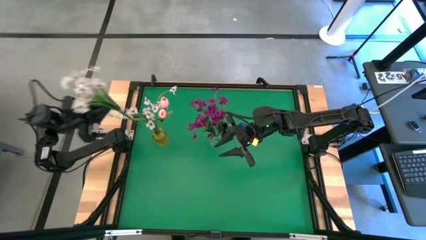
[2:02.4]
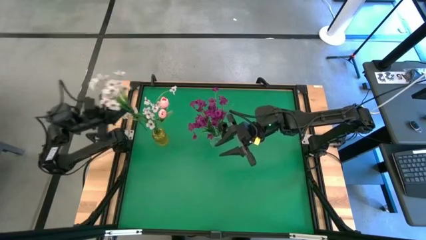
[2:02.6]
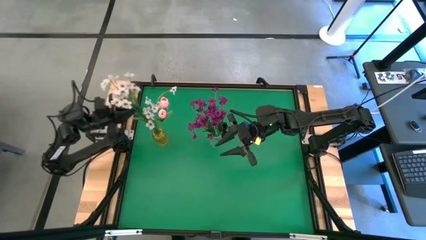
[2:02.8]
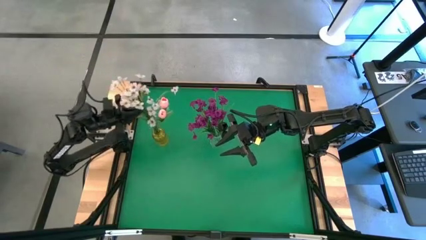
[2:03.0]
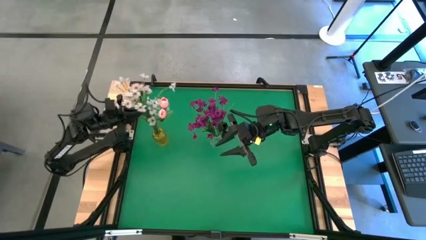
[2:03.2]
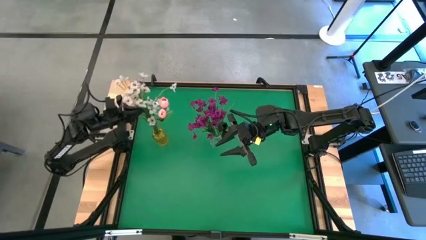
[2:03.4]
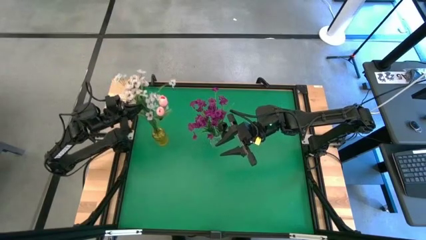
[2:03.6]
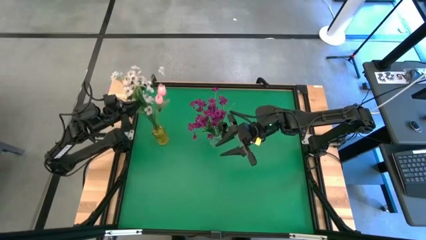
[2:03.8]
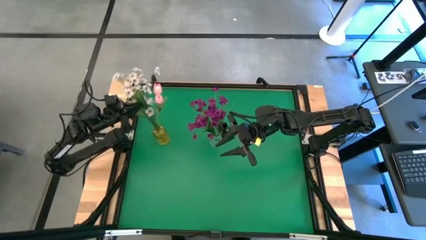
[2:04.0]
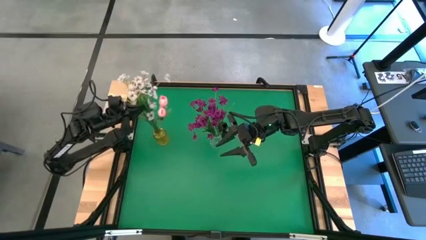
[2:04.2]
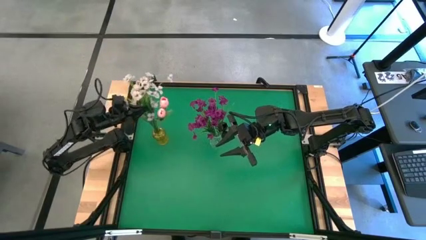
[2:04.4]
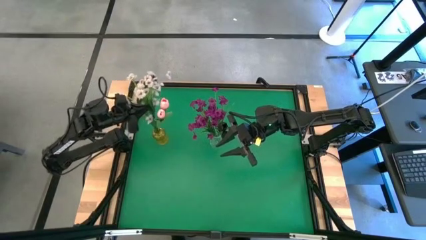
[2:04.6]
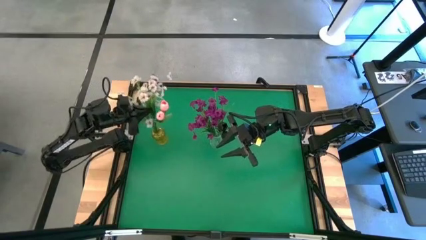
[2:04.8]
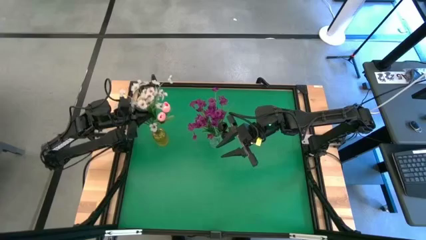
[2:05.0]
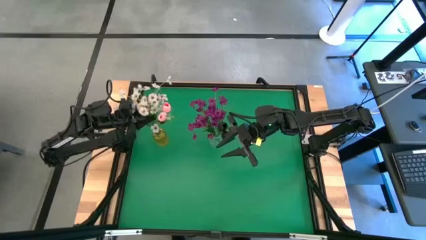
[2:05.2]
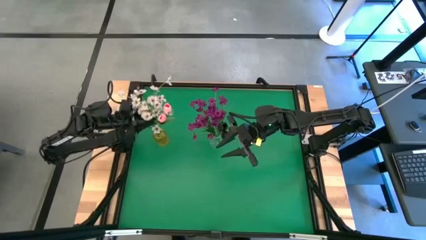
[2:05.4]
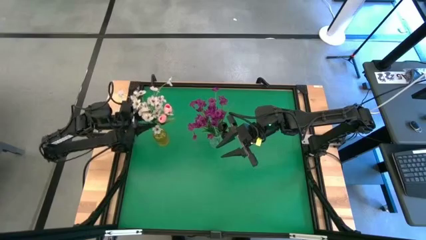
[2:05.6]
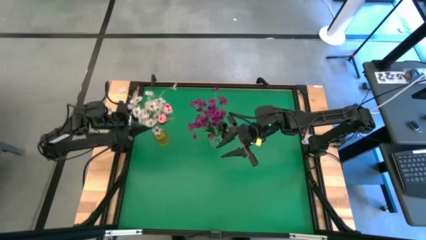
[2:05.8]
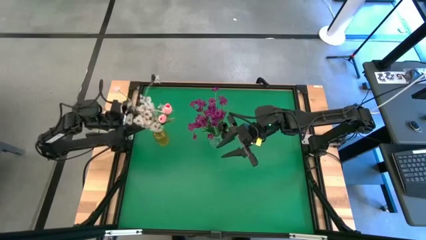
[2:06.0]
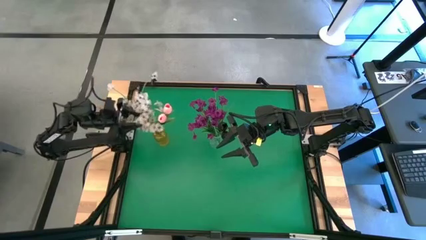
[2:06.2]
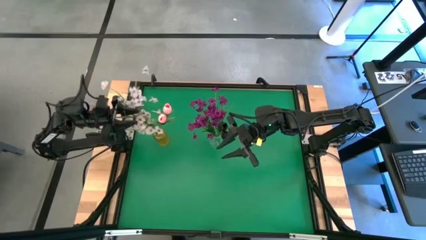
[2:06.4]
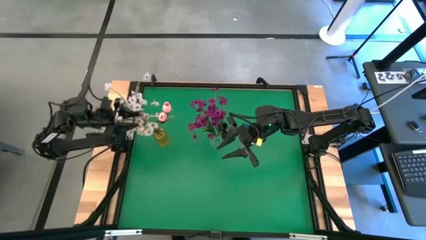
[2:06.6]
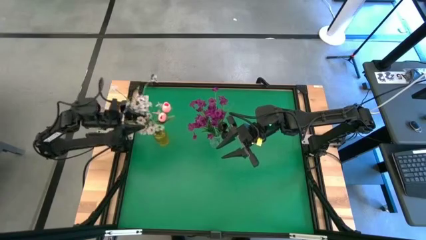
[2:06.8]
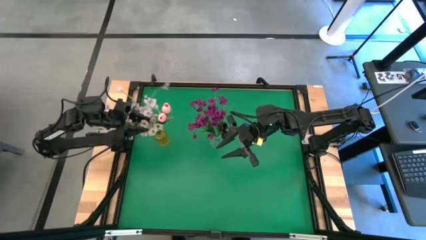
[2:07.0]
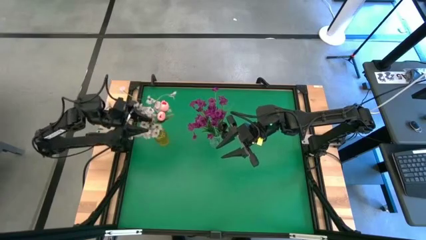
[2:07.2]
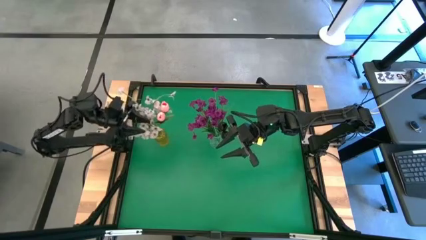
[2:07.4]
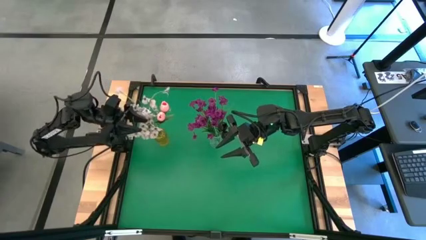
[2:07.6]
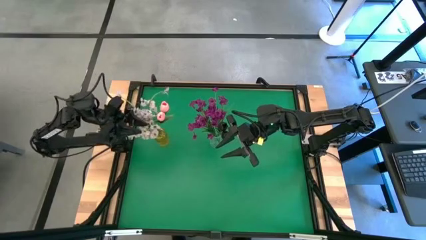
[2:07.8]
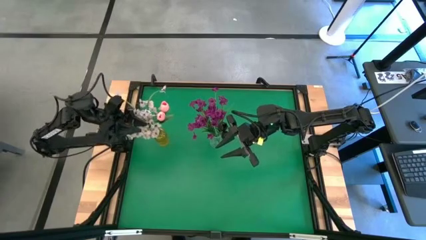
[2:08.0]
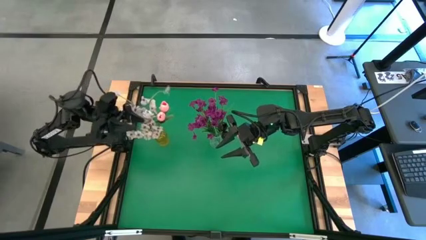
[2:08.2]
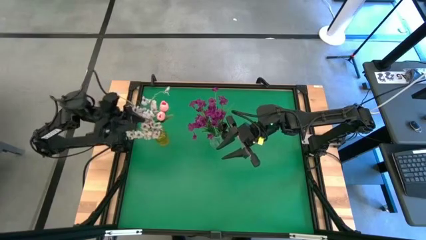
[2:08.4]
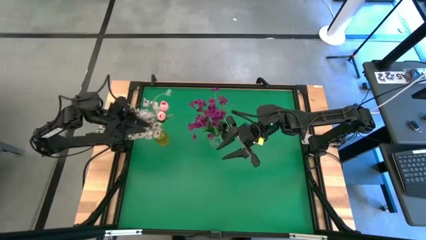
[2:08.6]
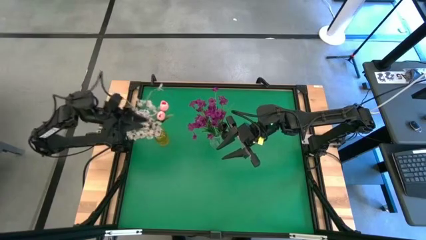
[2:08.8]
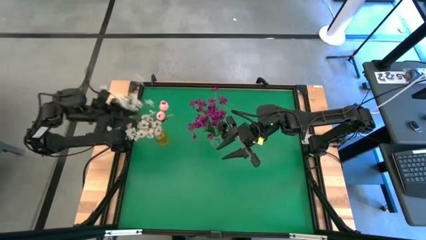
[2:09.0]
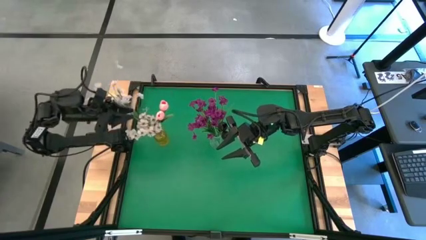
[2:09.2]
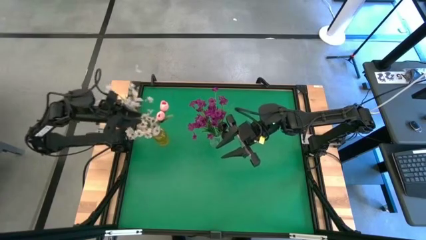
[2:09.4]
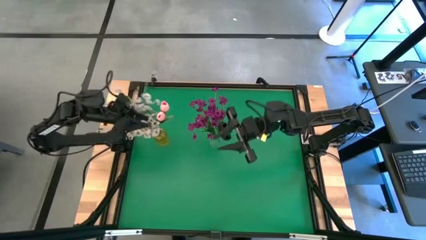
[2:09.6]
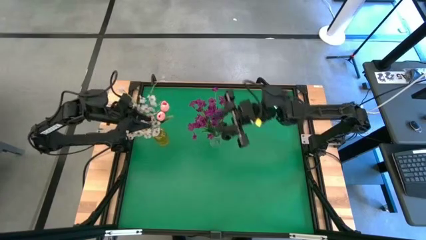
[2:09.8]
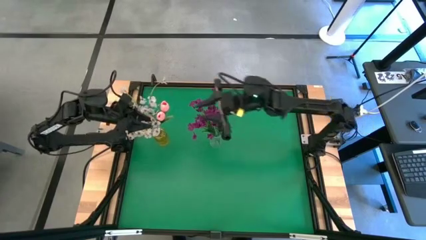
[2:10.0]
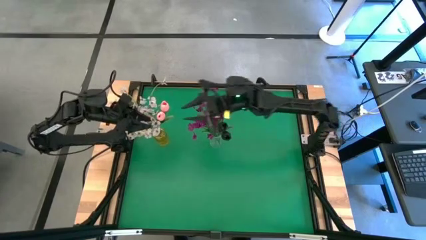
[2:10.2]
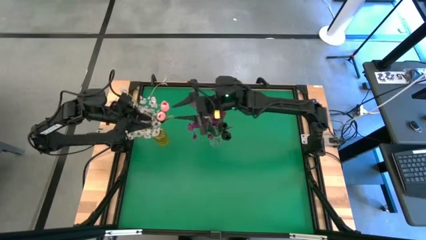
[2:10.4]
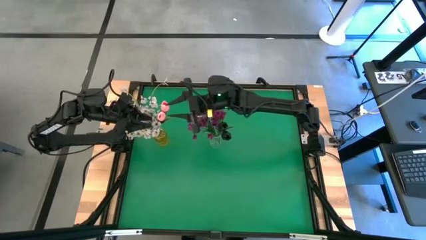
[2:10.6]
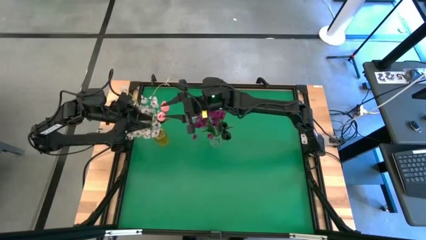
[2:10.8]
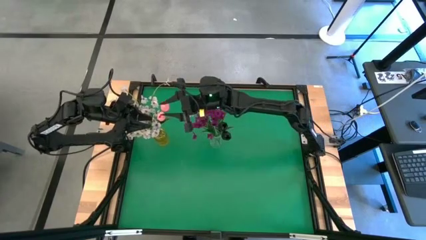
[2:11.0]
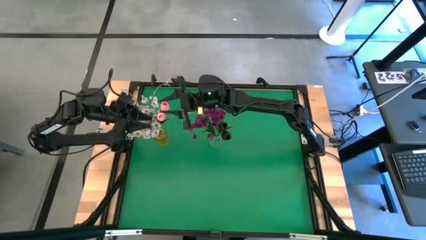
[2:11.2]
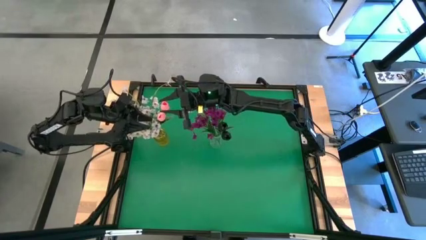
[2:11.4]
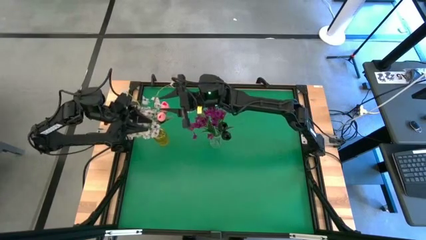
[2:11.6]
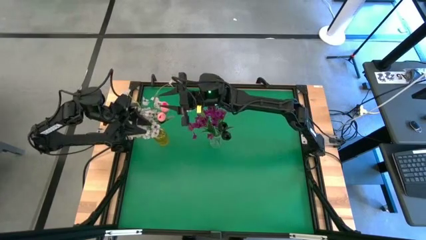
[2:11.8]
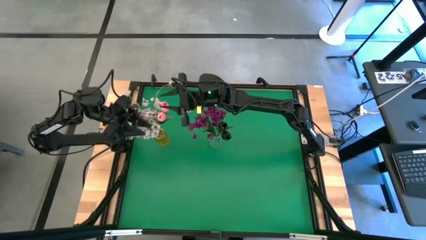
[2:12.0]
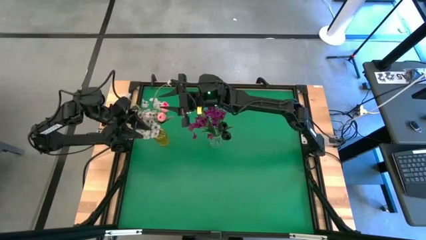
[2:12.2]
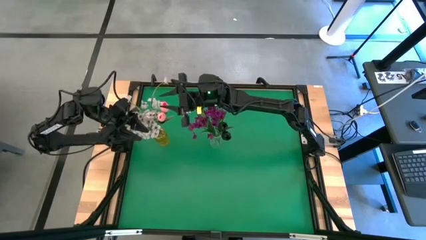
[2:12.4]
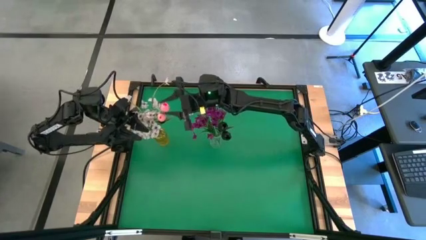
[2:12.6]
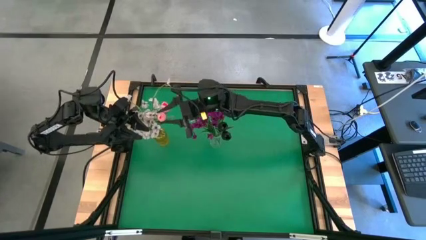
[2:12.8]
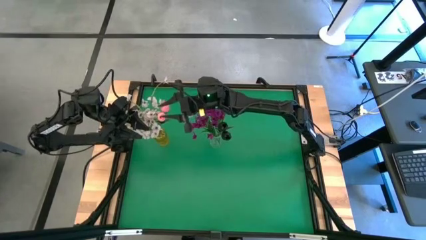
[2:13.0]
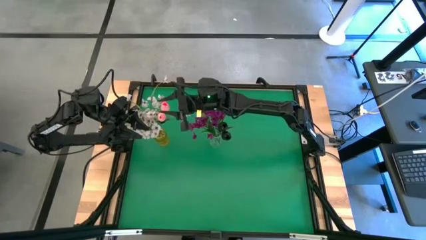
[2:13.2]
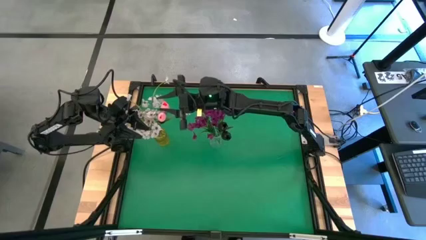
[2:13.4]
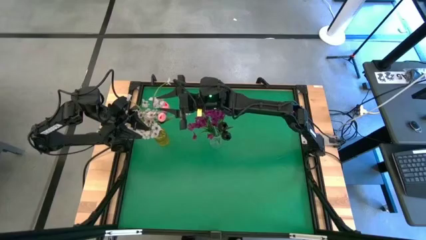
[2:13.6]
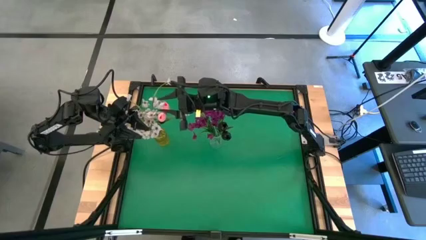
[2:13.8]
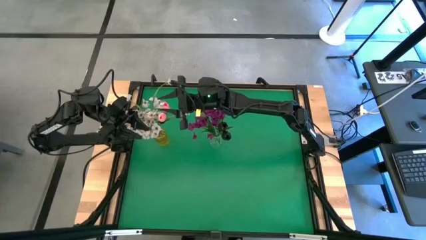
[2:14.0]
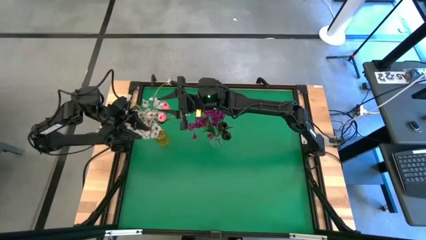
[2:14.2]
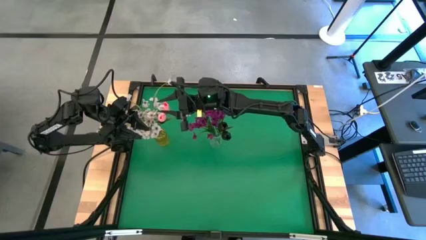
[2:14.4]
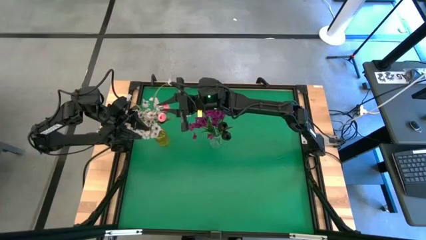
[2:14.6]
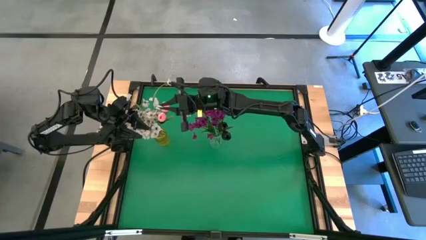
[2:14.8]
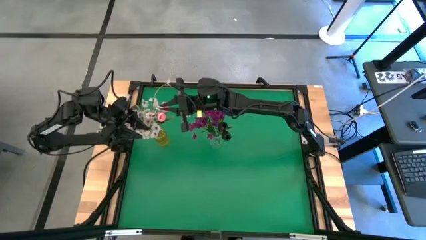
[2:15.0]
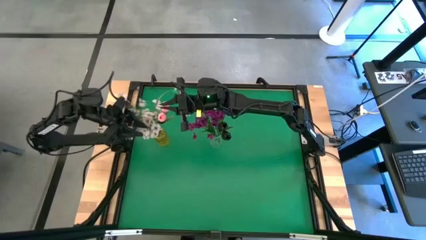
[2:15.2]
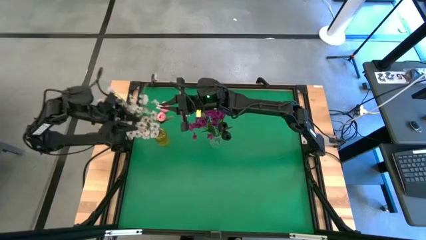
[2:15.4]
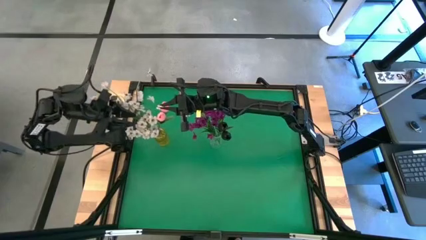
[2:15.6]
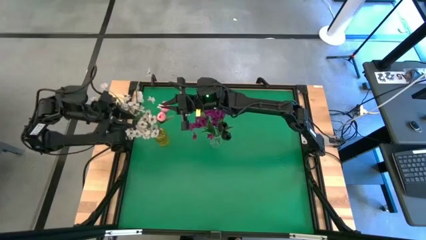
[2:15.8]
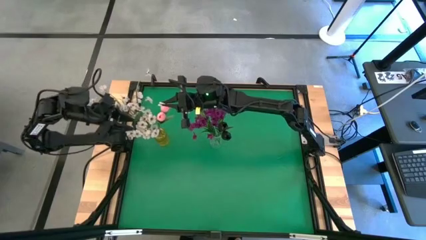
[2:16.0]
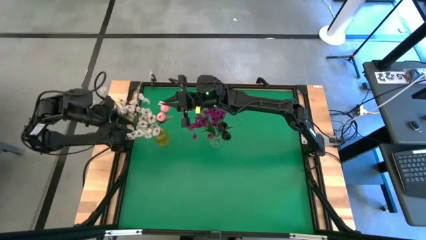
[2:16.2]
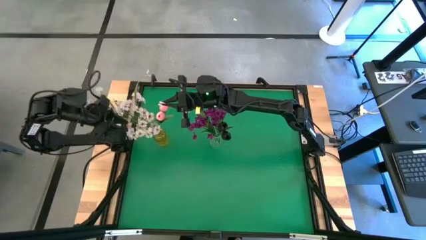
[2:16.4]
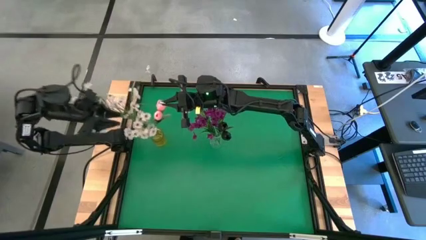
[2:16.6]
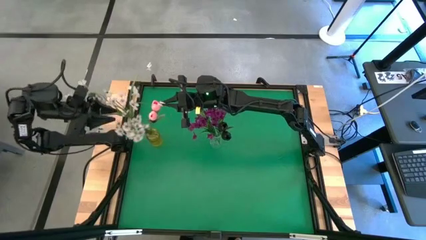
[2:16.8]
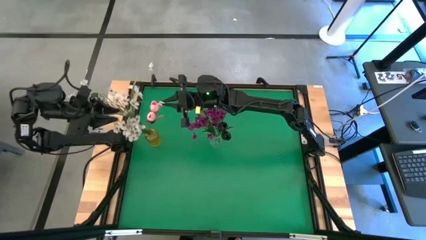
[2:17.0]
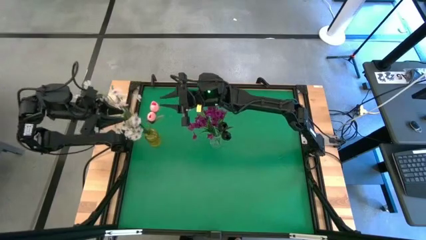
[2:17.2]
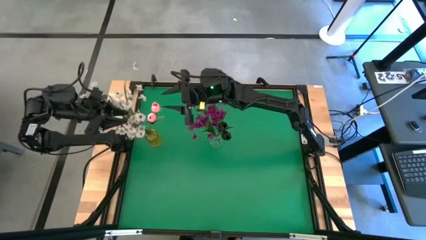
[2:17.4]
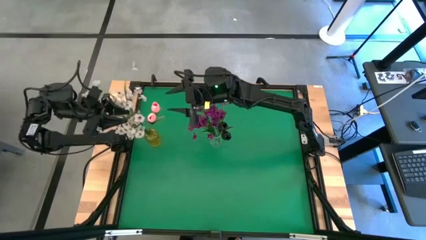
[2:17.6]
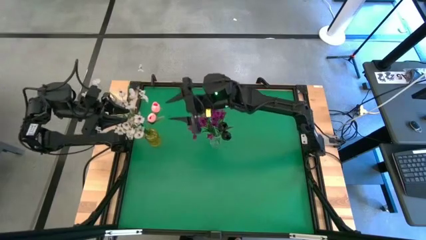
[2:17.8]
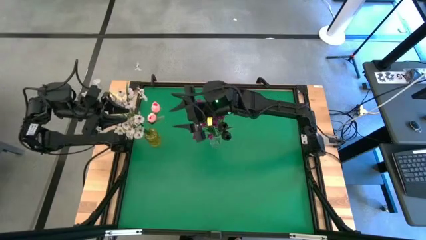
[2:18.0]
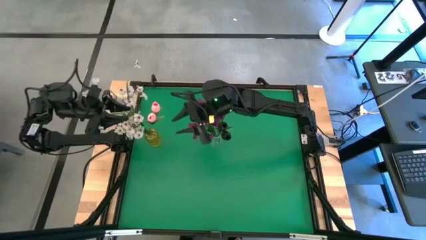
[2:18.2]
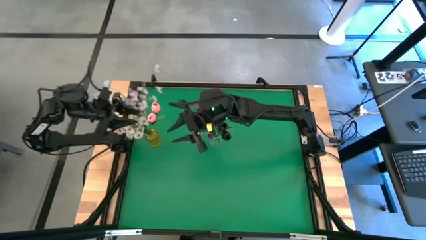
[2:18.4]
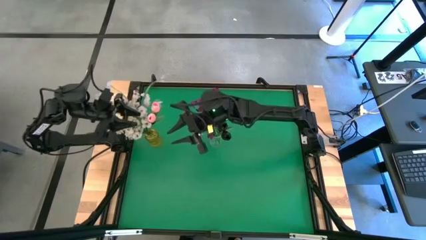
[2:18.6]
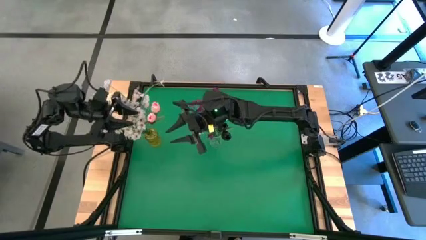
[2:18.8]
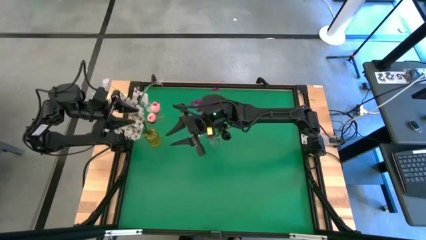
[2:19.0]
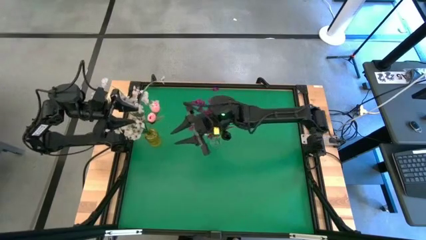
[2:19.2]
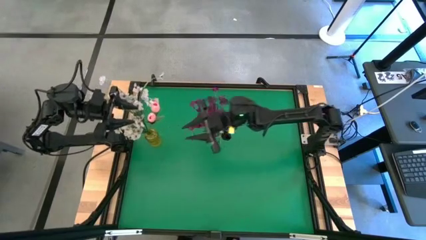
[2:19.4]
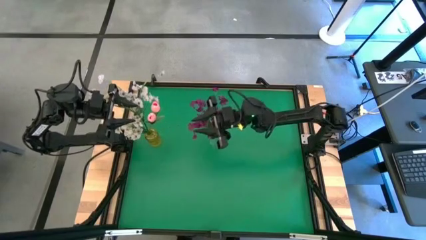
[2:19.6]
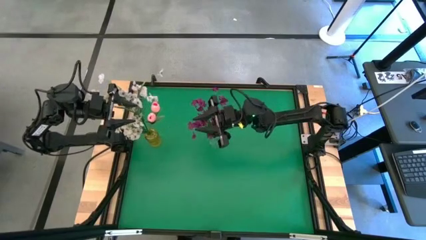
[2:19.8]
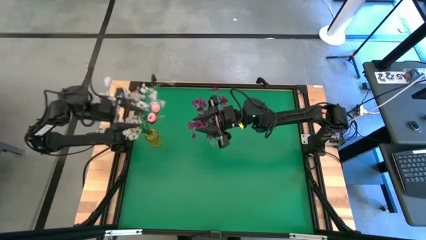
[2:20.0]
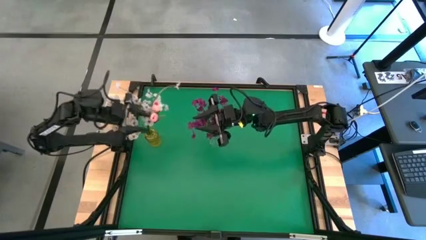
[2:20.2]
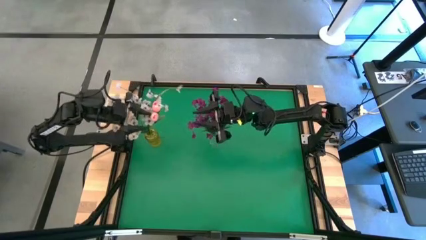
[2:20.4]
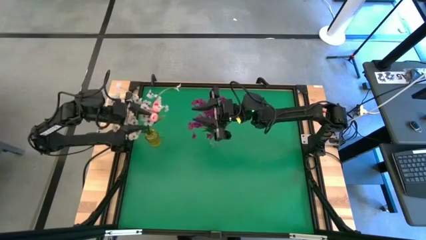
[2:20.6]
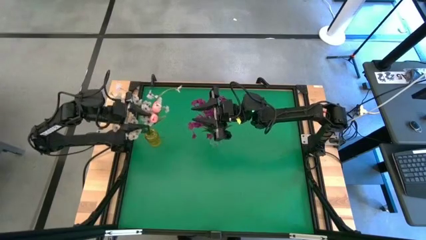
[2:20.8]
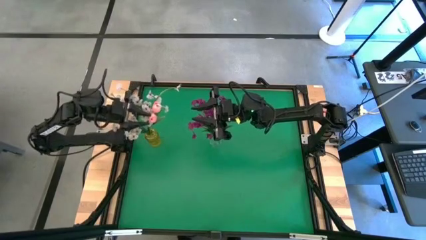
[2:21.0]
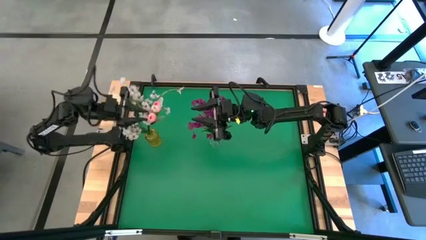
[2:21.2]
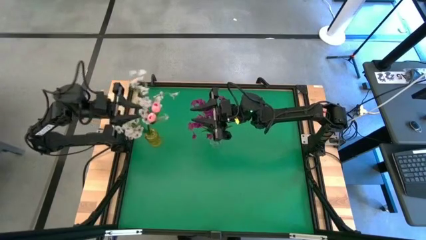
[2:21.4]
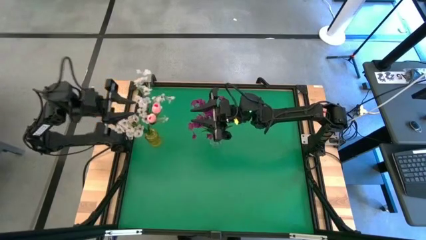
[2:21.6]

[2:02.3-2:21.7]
Task: Sort flowers into vase by color
Put the white flowers into the yellow vase
